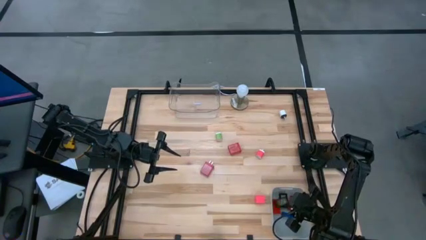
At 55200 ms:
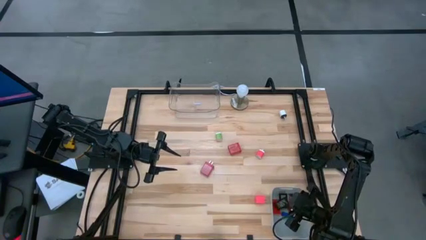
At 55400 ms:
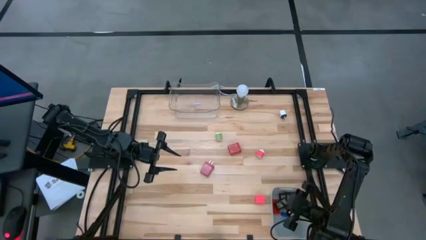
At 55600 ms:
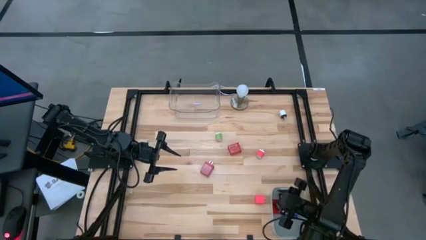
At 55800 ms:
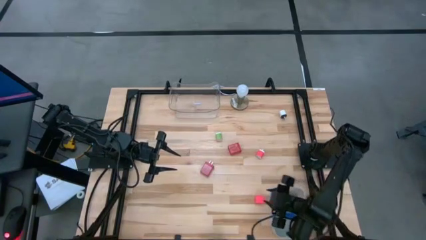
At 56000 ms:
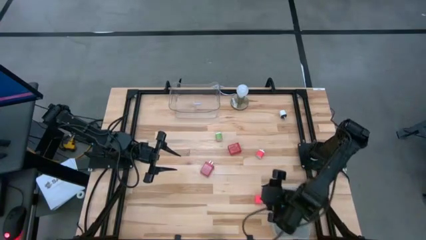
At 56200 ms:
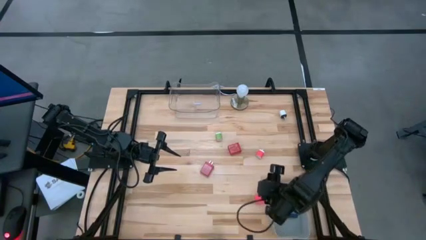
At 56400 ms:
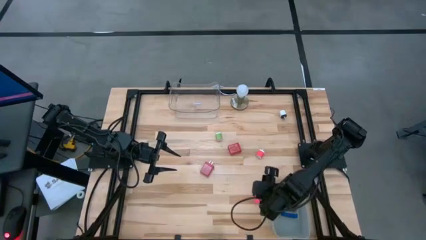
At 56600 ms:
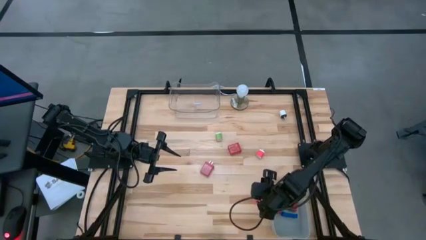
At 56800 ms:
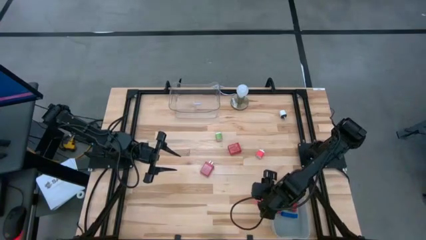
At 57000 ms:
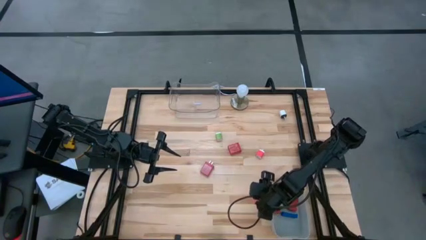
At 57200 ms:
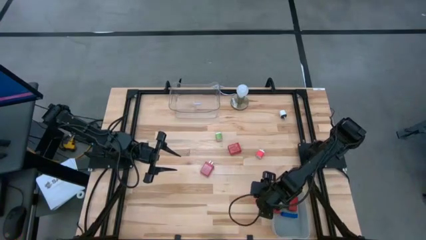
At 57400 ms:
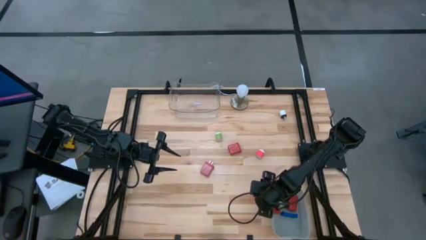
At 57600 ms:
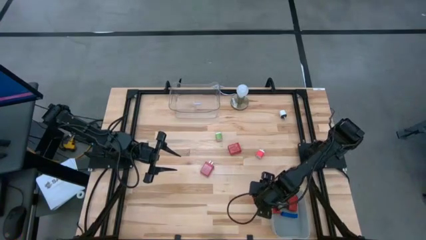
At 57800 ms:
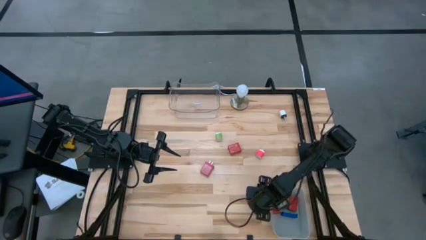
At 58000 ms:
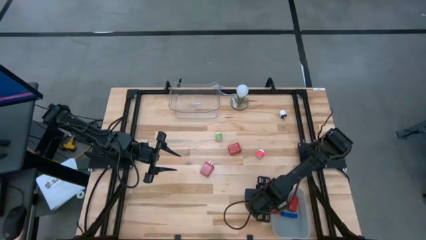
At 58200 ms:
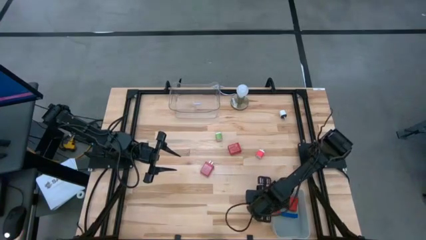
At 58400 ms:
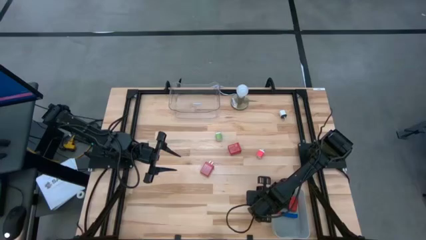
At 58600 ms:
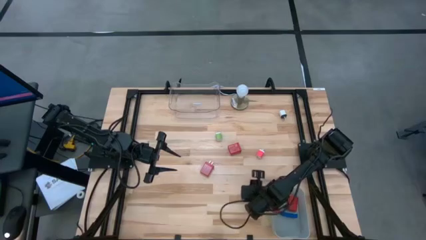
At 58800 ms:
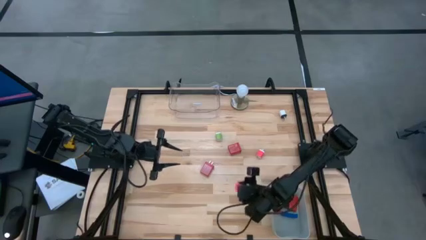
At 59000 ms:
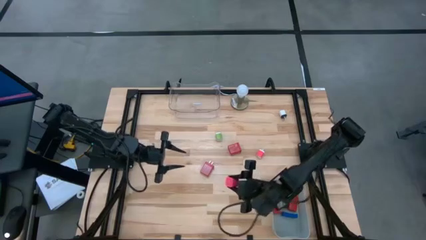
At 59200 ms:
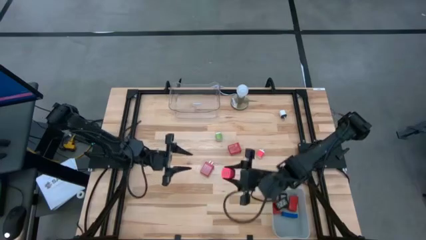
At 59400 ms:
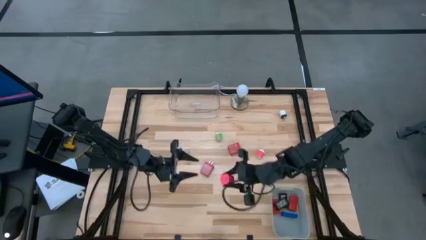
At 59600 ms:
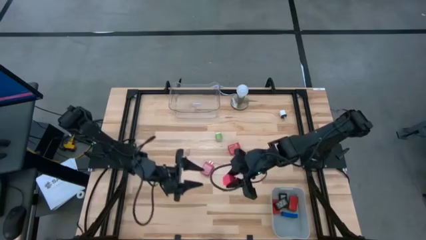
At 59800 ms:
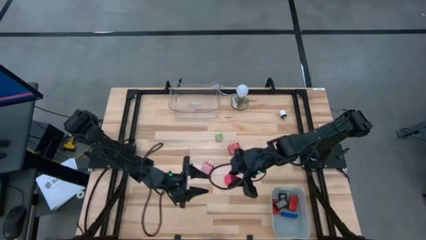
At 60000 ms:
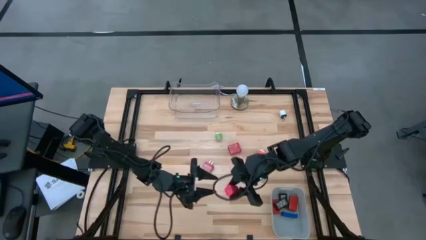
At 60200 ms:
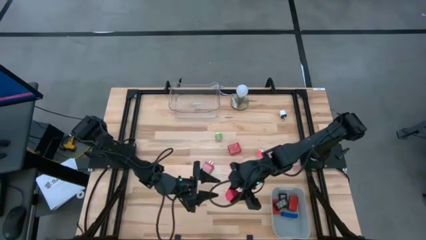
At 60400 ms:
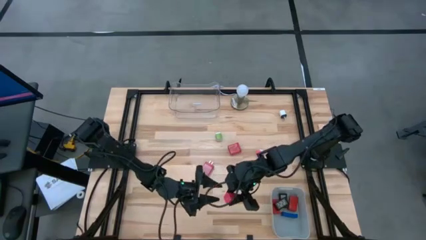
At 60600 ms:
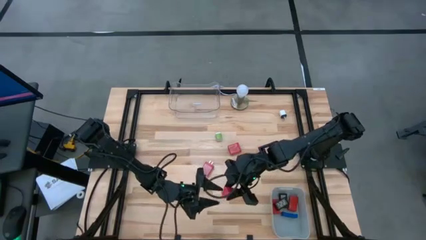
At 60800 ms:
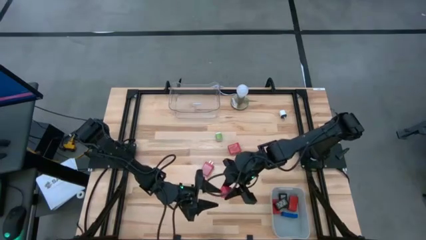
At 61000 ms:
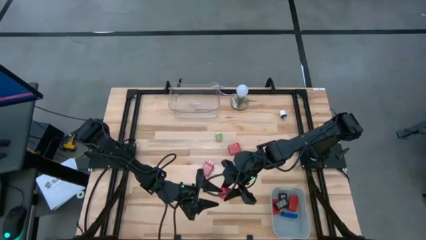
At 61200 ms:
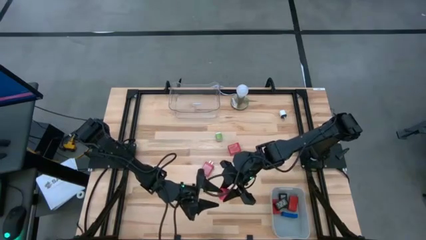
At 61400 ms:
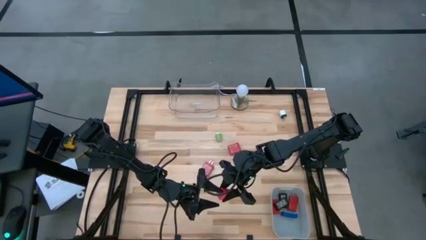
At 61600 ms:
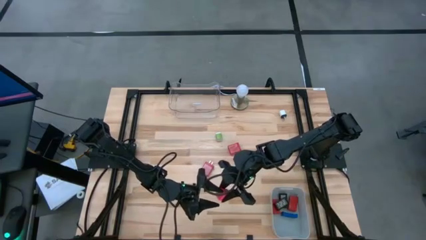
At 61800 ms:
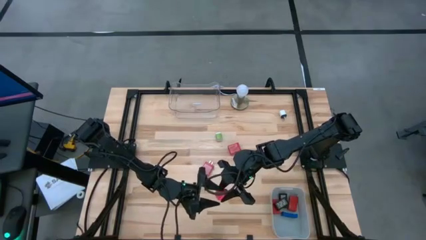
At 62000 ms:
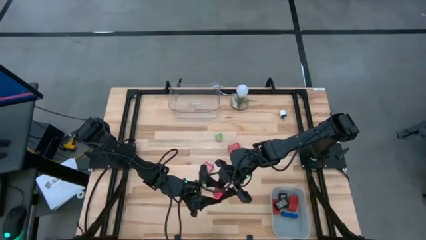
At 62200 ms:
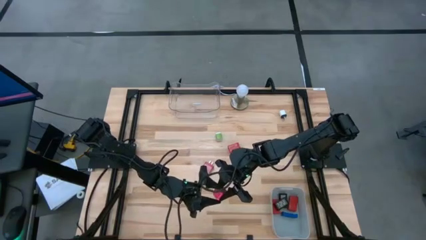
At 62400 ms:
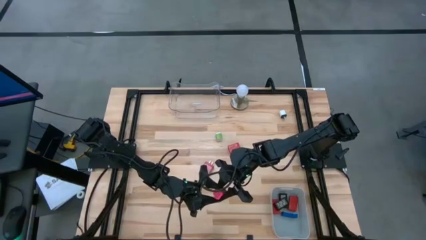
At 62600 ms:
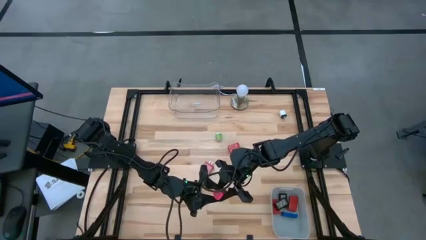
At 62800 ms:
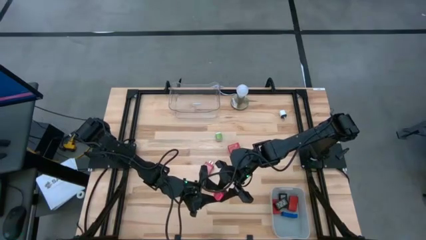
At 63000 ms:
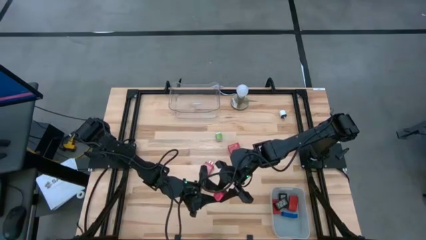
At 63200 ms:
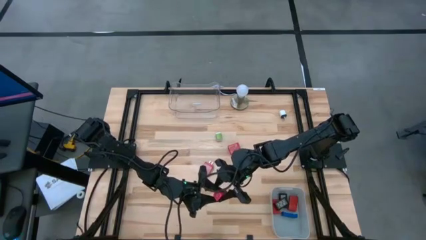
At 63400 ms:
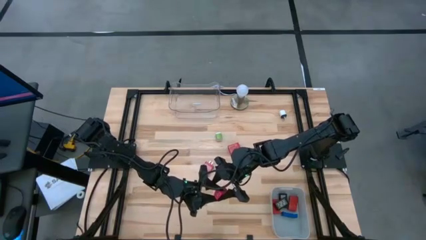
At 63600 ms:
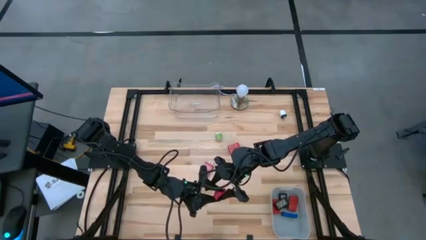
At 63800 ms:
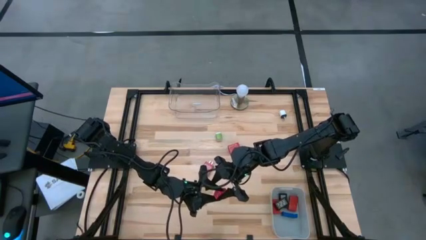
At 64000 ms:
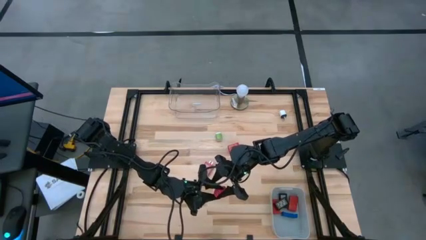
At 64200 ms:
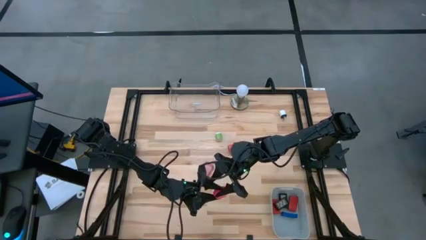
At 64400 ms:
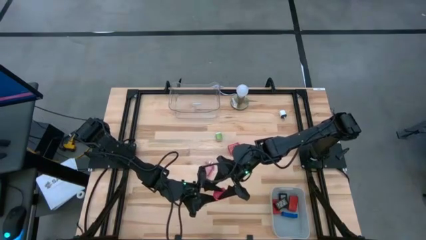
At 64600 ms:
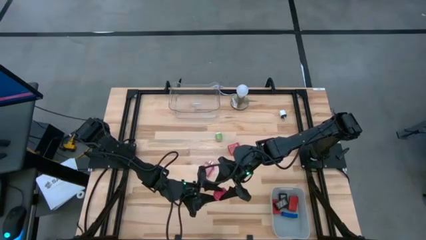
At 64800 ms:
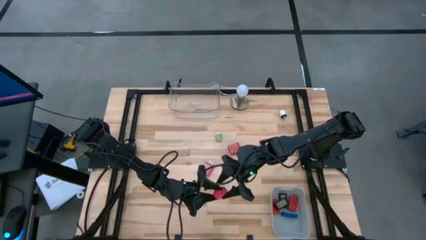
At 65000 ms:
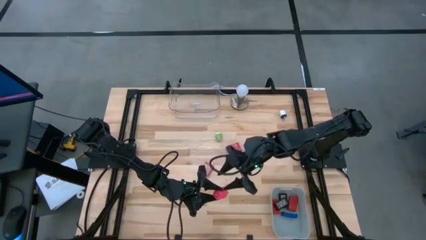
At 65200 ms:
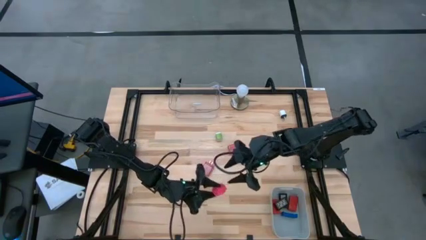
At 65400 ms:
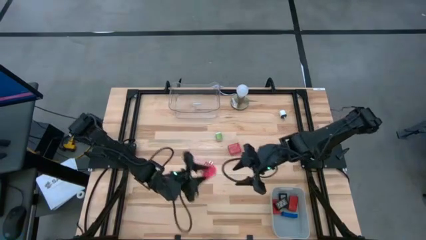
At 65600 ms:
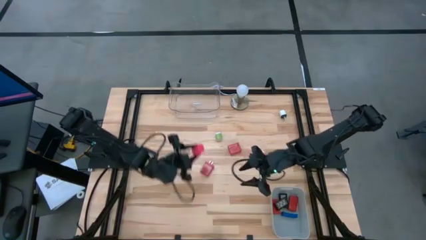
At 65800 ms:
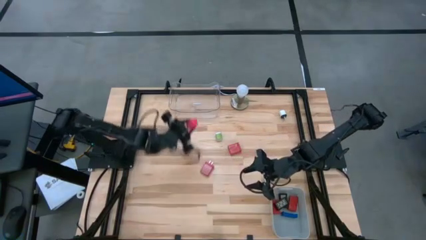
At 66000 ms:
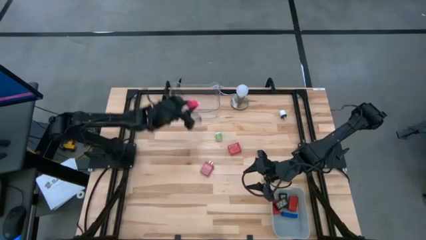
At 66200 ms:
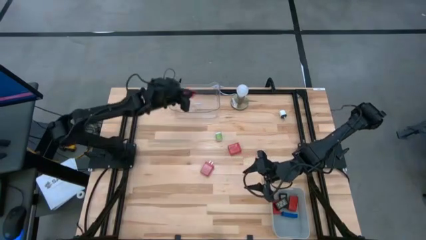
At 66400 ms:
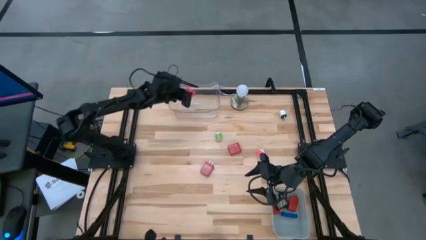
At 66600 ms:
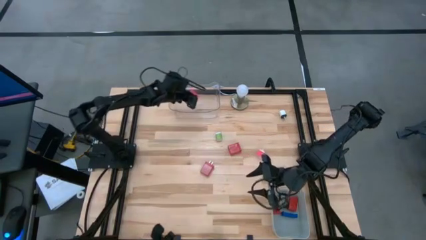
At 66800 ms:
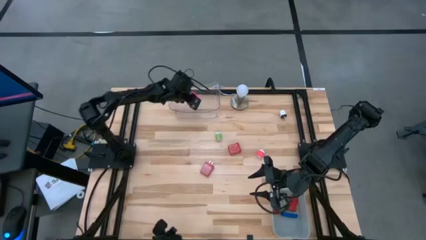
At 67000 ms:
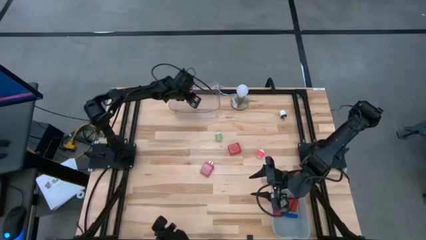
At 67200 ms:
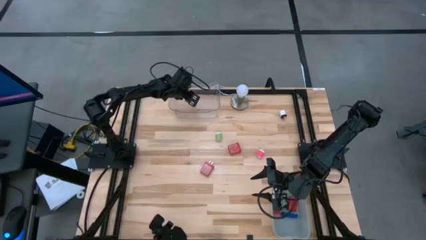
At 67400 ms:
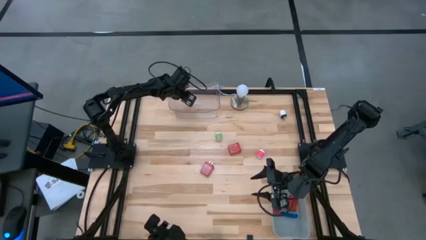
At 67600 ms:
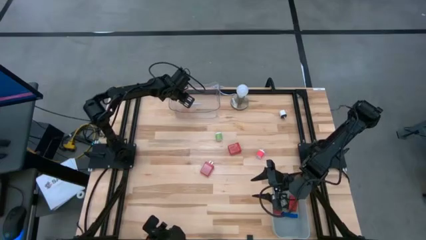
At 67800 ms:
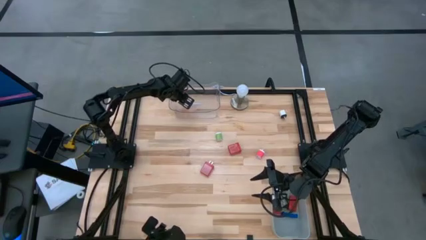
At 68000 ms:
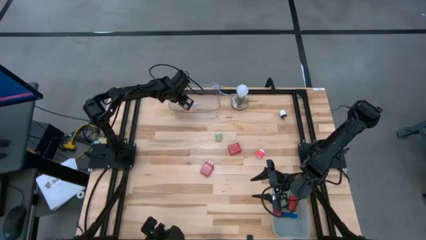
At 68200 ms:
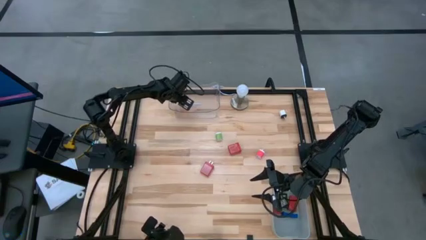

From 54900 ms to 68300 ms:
Task: Pick & Place Office items
Put the pink charger adapter into the transparent bin
